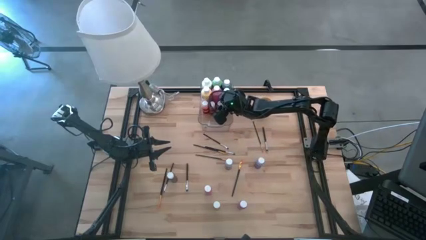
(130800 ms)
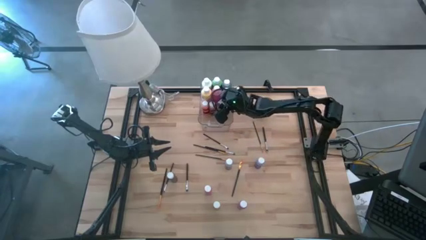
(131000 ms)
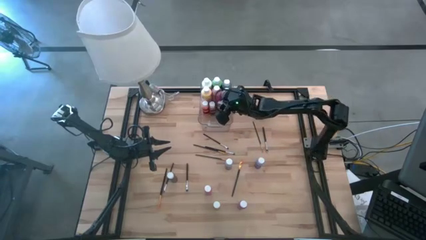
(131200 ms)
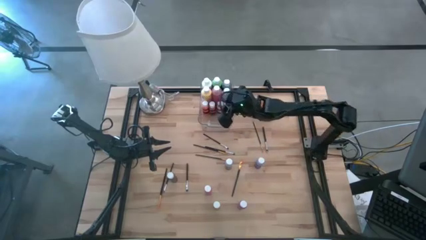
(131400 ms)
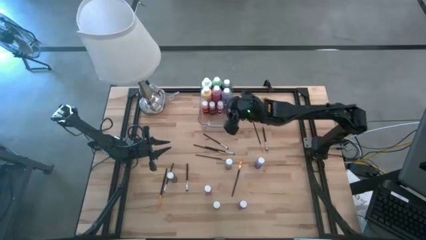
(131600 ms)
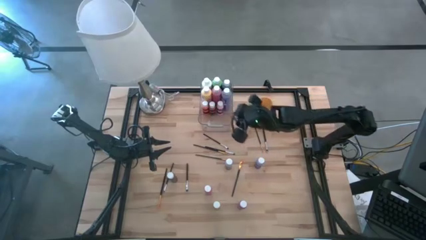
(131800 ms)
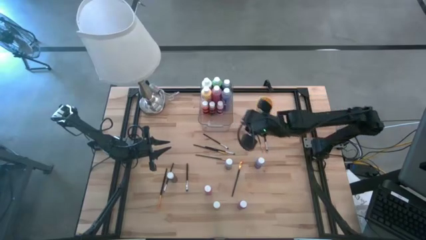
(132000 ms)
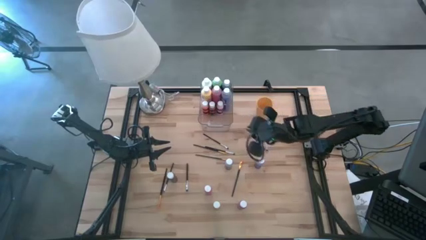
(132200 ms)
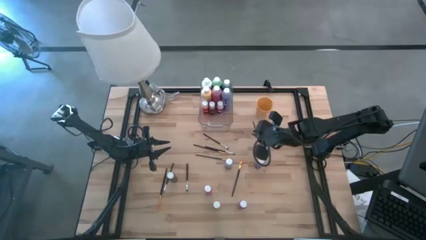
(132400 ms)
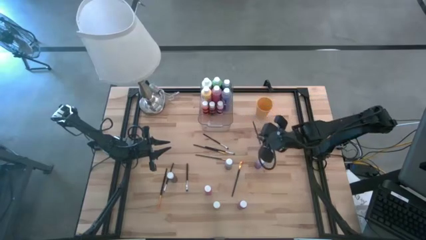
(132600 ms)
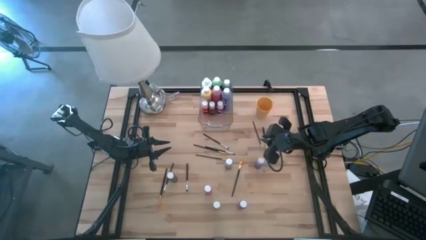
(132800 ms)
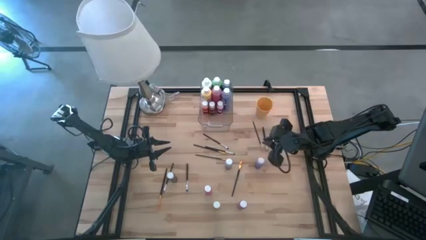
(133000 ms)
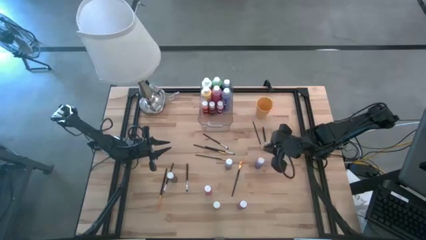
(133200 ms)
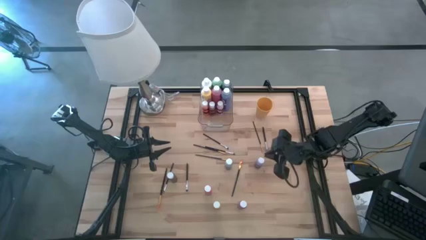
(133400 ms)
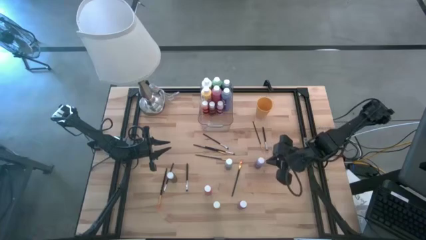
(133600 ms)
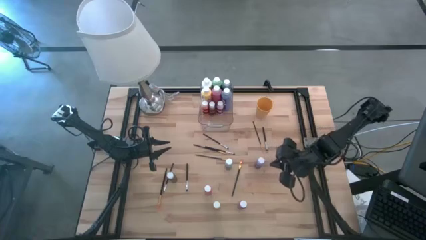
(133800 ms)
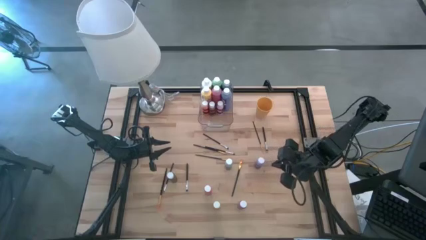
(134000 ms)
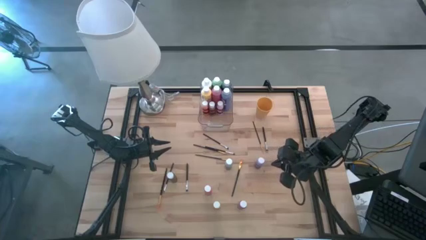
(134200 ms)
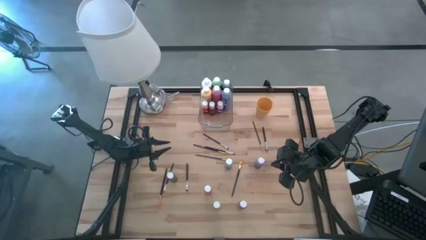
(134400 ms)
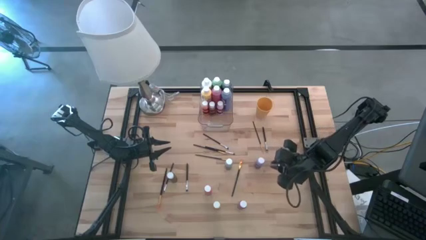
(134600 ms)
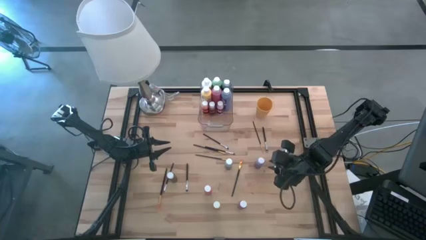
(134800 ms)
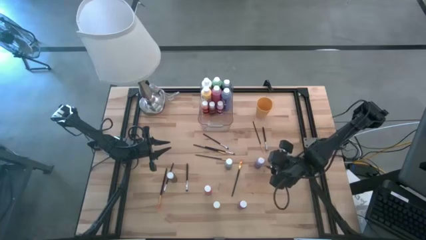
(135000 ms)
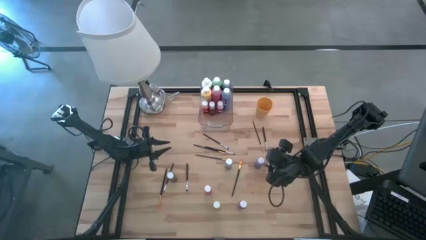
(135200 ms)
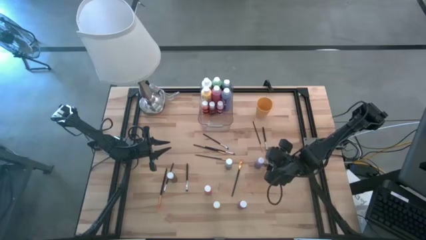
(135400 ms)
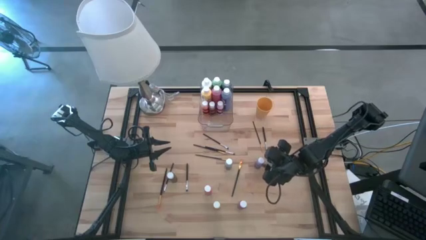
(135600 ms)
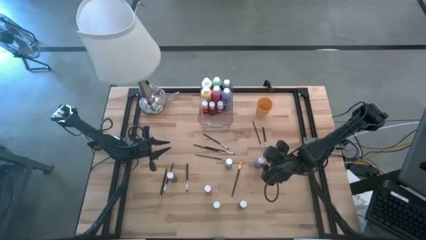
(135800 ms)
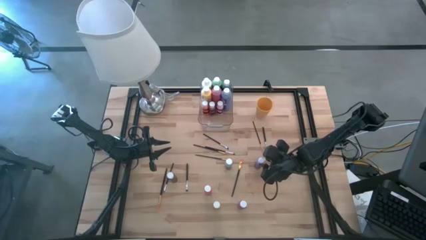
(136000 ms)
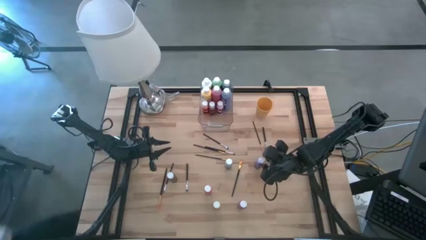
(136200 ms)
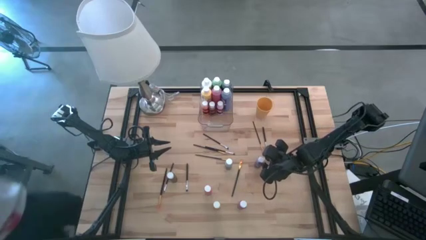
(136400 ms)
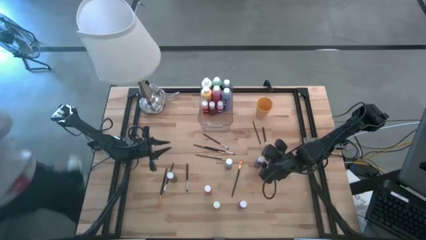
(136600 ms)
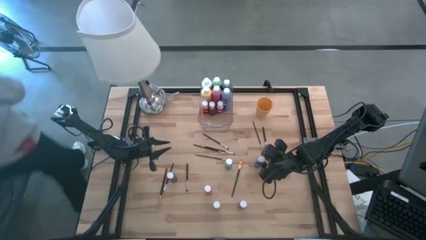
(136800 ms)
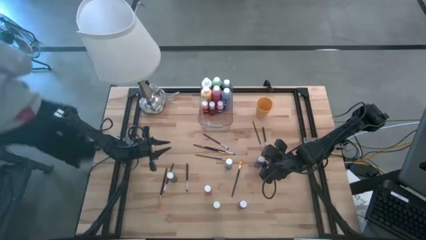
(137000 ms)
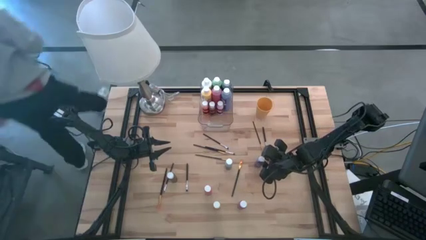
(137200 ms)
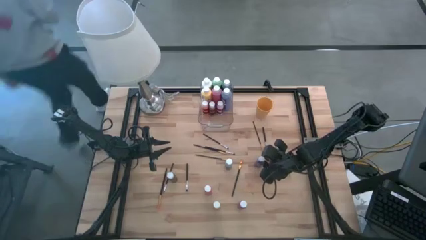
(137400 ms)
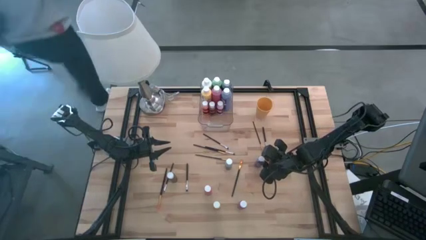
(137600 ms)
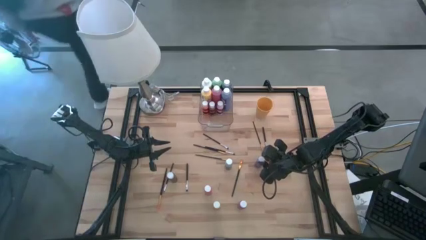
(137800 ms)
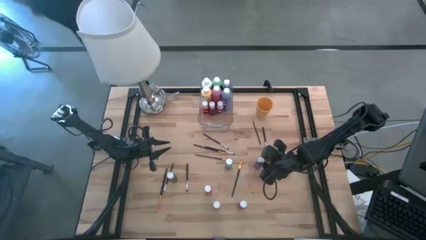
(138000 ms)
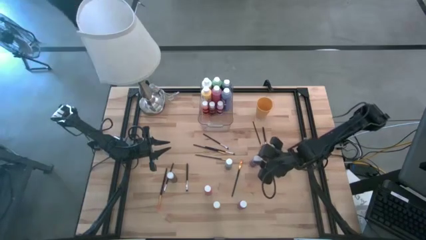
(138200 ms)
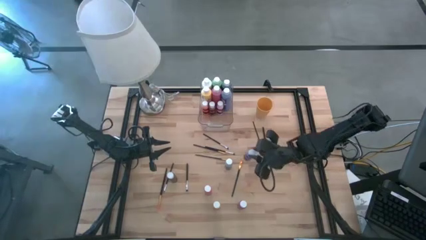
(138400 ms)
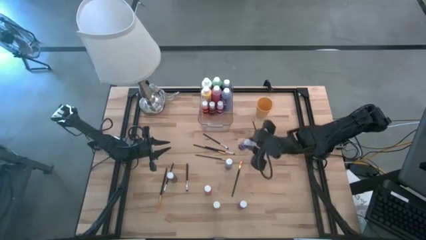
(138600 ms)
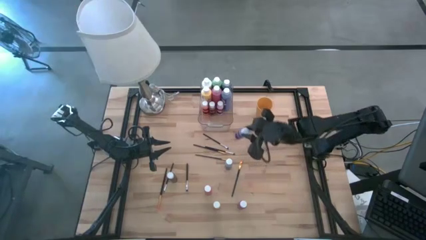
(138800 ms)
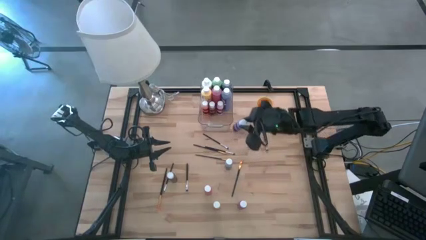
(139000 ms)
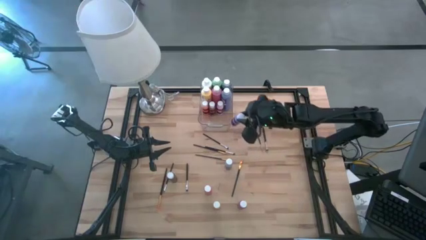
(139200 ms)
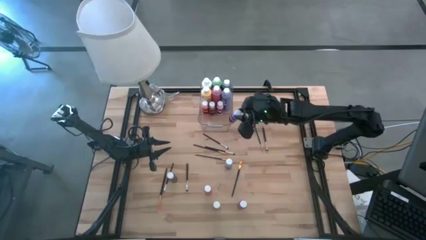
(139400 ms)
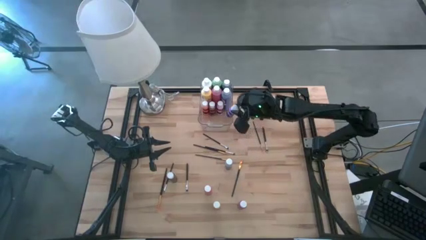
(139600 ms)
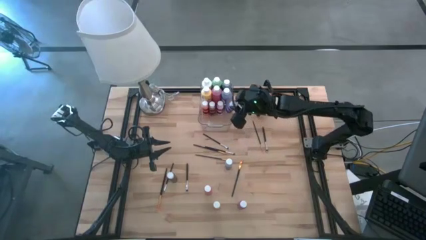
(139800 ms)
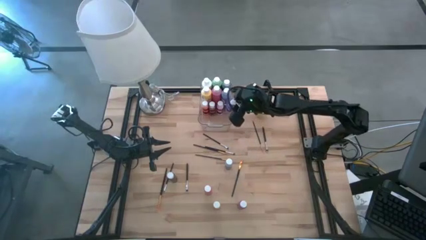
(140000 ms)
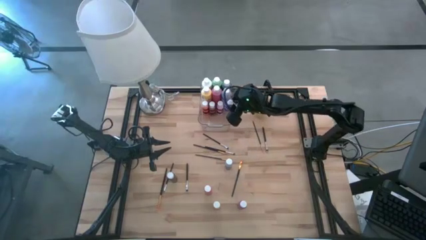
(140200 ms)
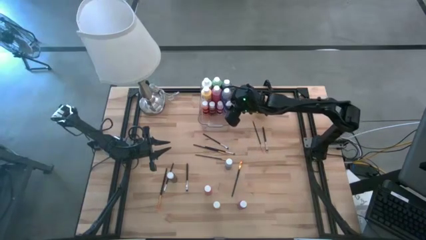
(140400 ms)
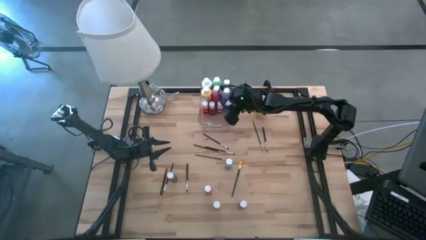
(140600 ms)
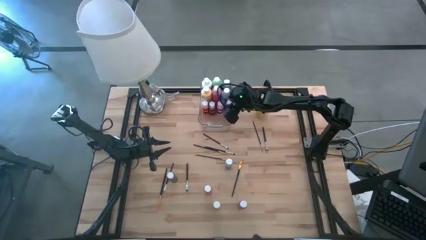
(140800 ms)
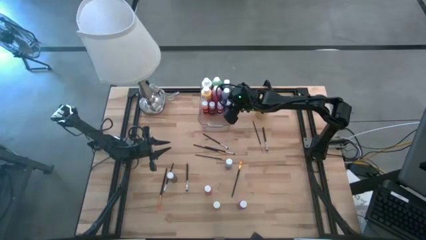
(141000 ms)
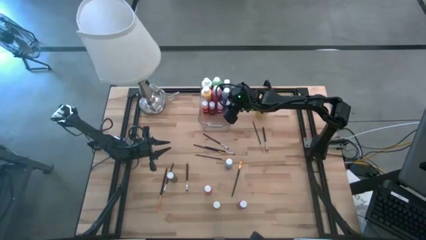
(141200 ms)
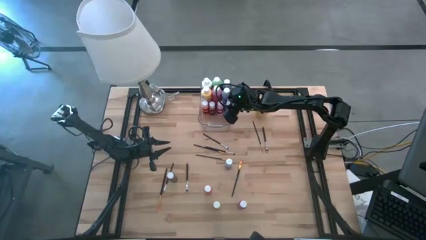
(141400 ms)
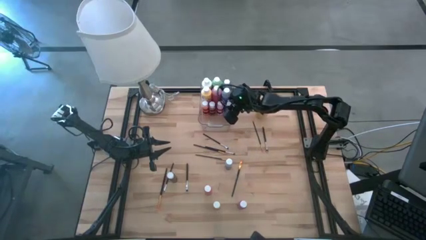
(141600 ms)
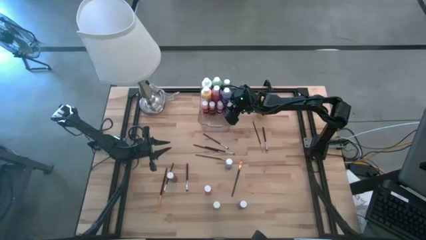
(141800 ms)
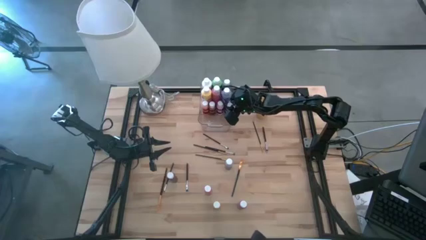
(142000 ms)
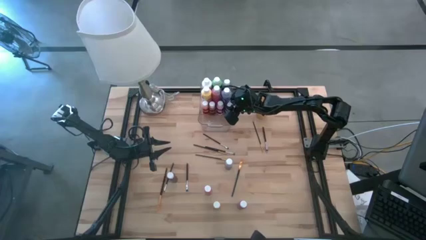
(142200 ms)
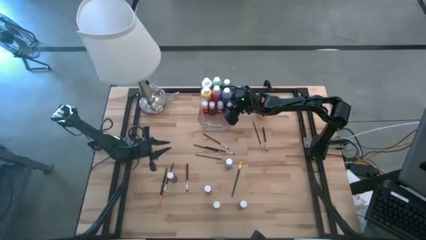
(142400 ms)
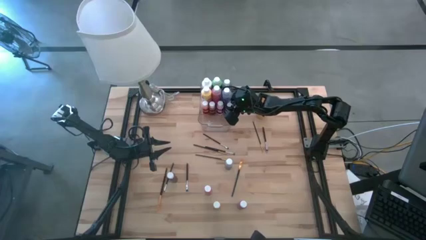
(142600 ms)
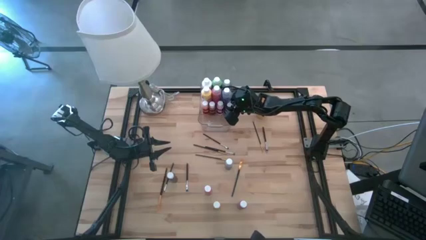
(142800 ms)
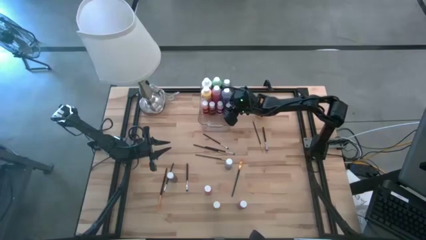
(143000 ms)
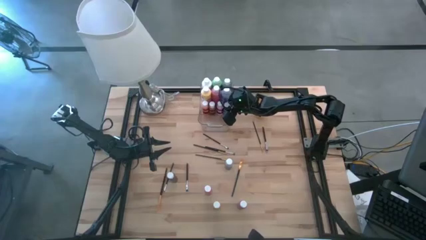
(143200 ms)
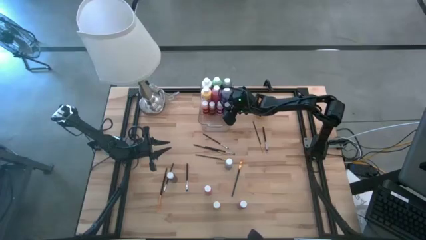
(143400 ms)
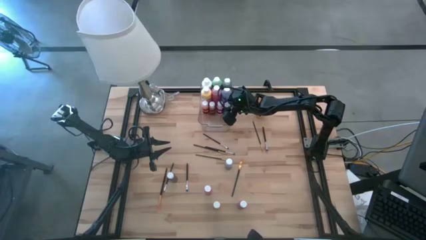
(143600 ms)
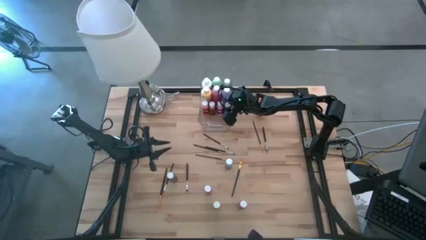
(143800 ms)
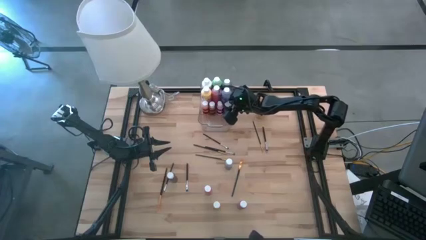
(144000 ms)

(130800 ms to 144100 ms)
Task: Pick & Place Paint Supplies
Put the small blue paint bottle into the bin

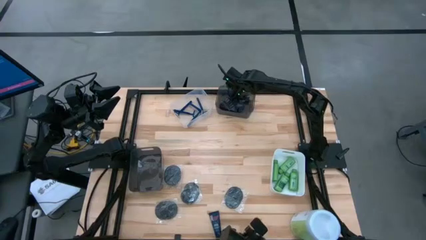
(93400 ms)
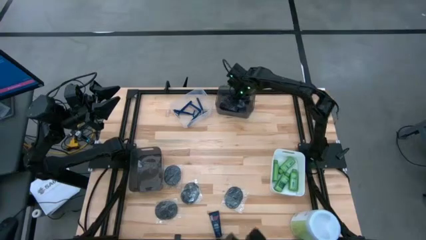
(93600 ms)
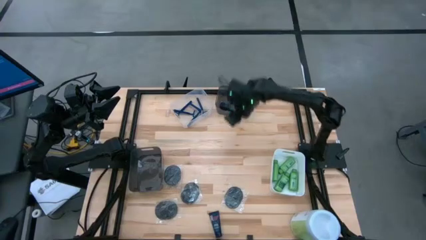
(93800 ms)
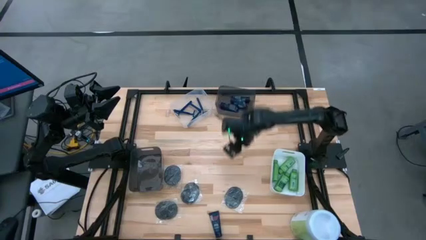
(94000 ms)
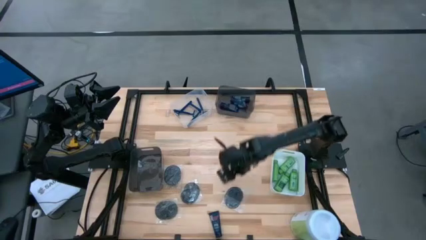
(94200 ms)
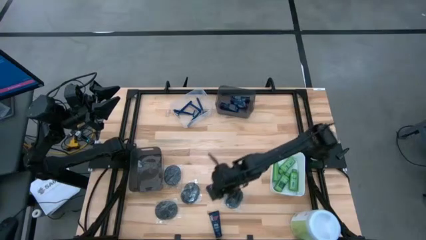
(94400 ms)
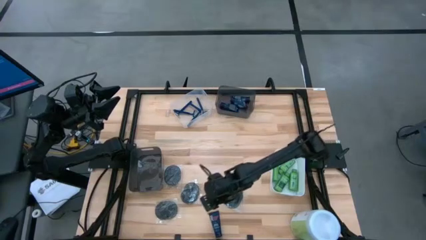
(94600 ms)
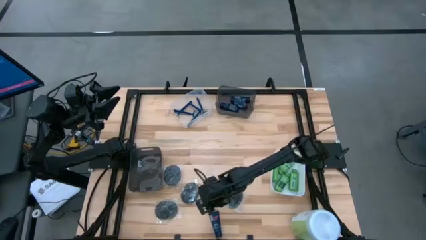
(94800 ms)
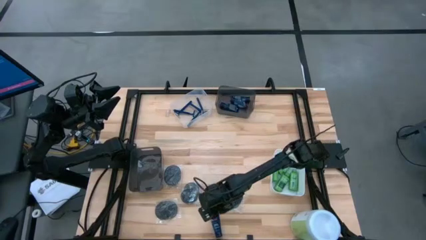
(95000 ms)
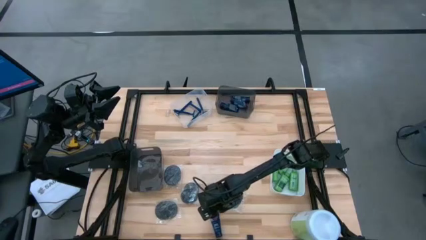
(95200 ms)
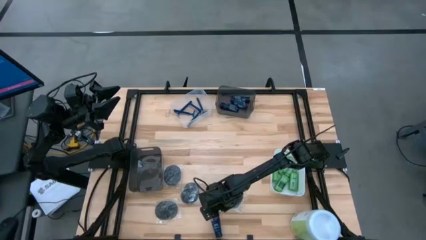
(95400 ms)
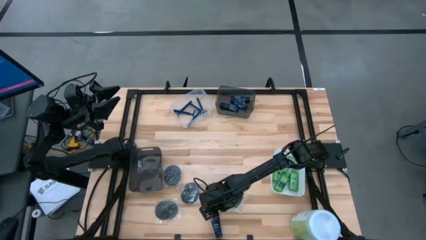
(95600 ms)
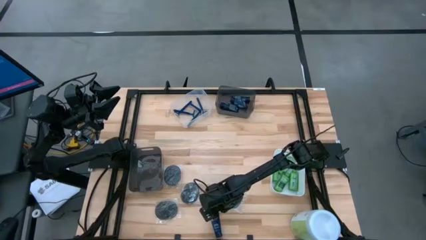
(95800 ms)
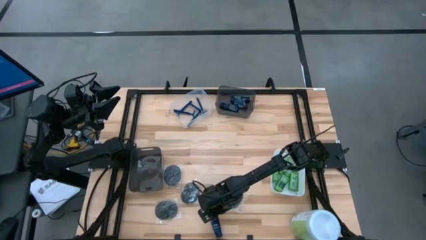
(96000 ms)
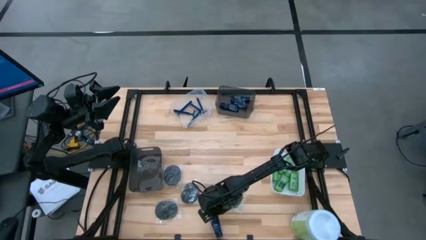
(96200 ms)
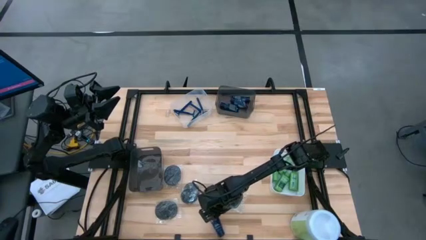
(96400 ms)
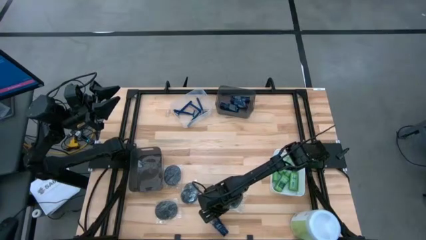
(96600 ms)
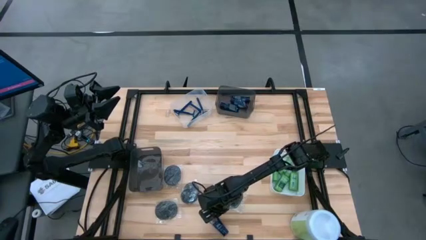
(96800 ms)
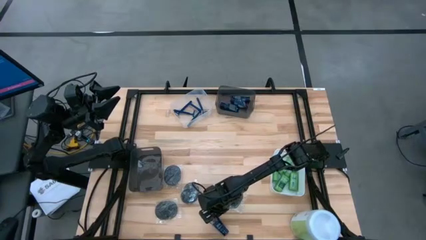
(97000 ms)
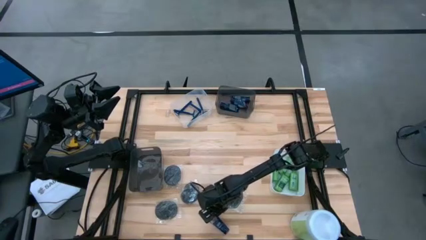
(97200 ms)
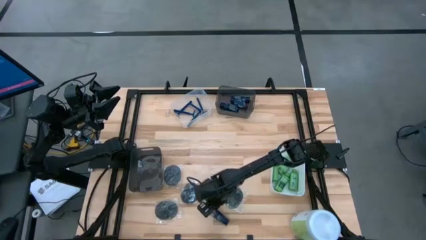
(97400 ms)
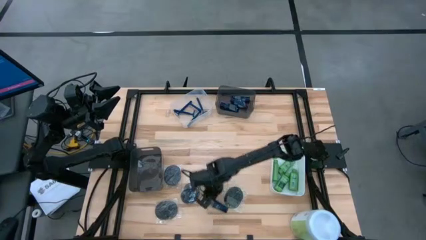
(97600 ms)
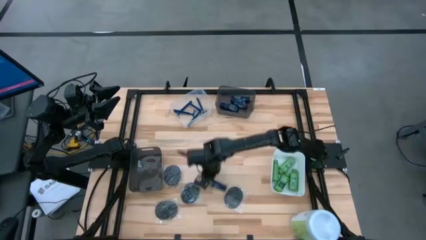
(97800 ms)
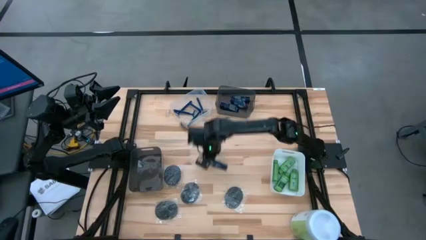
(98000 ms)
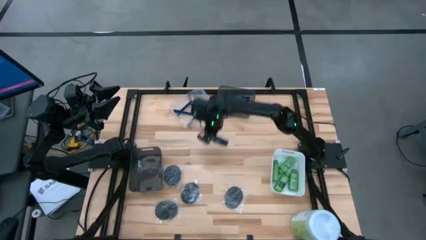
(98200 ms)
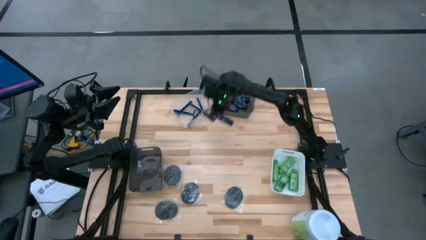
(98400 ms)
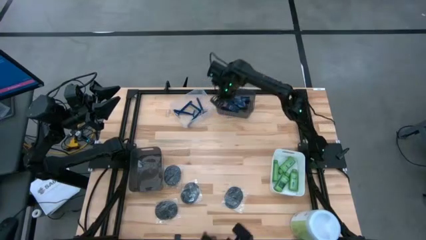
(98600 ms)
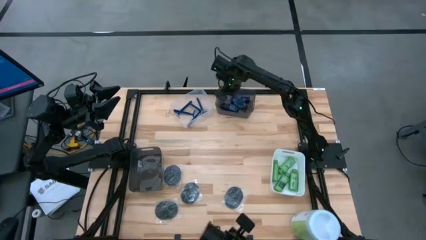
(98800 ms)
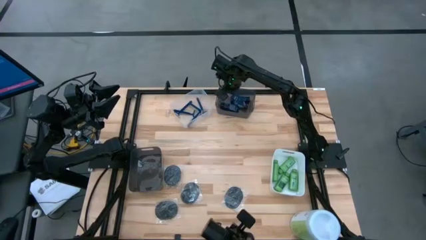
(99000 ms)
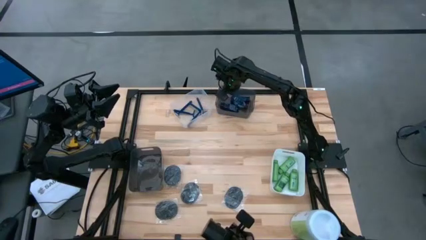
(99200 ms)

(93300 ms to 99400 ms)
Task: Pick & Place Travel size toiletries
Put the blue shave cream into the top black bin
